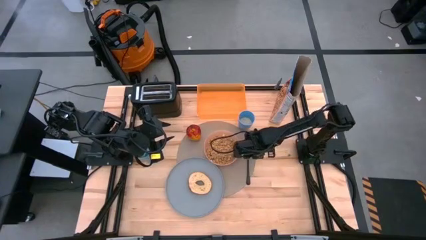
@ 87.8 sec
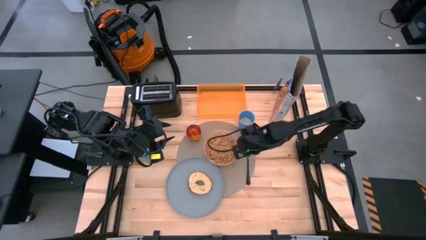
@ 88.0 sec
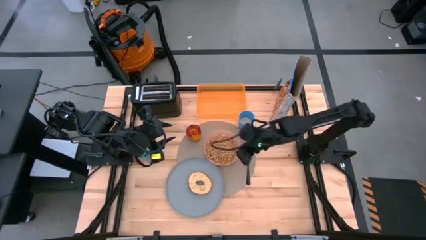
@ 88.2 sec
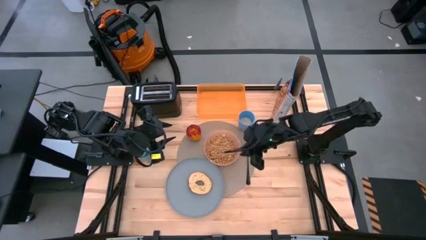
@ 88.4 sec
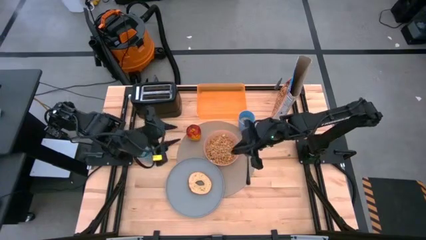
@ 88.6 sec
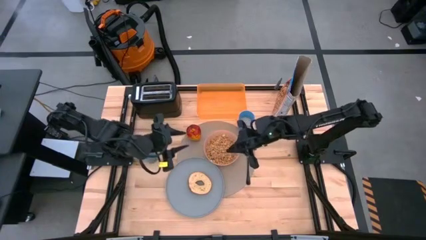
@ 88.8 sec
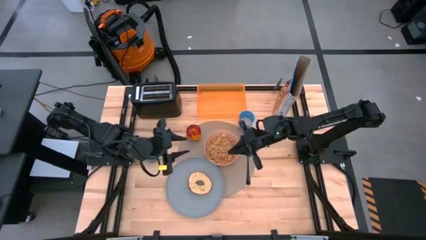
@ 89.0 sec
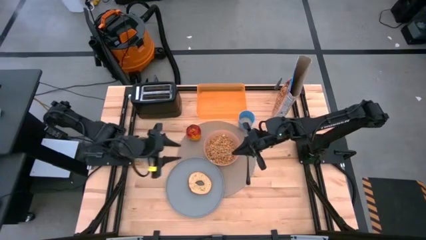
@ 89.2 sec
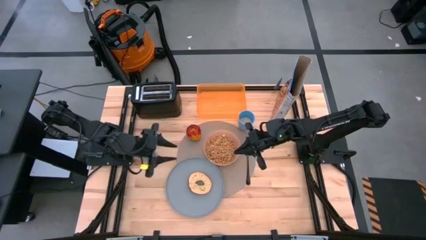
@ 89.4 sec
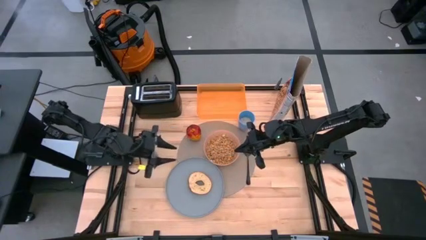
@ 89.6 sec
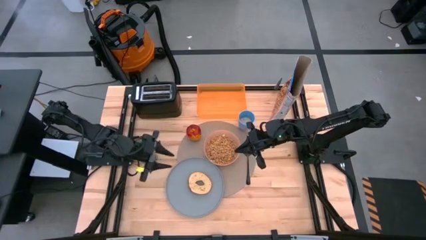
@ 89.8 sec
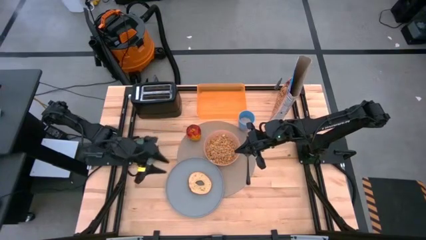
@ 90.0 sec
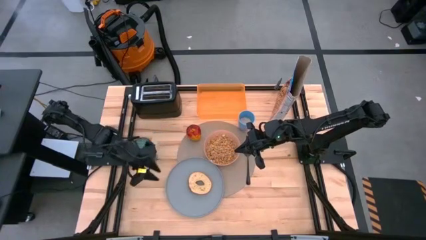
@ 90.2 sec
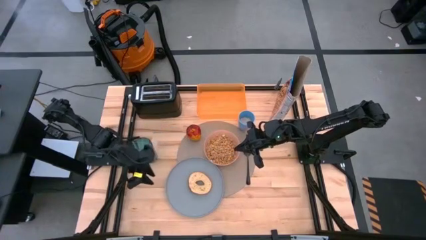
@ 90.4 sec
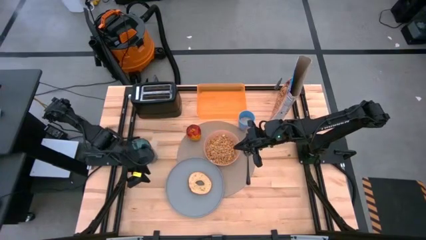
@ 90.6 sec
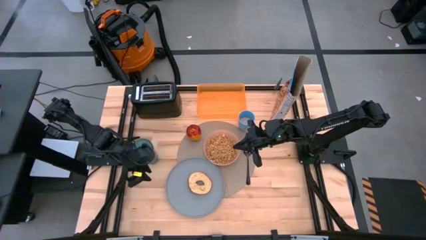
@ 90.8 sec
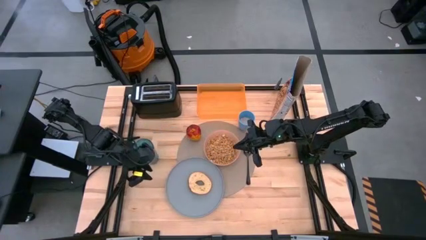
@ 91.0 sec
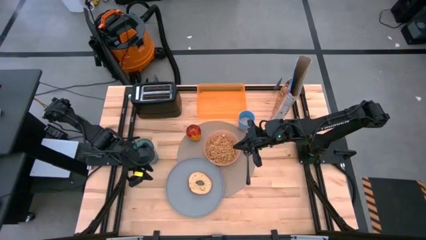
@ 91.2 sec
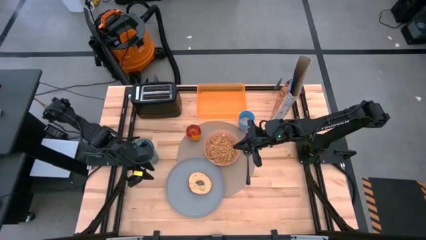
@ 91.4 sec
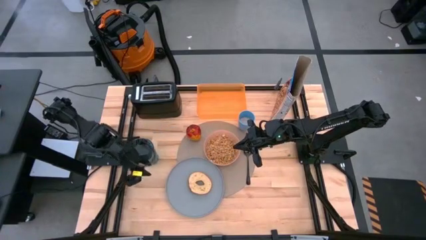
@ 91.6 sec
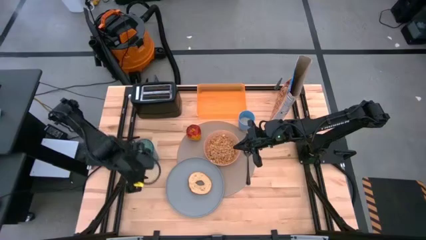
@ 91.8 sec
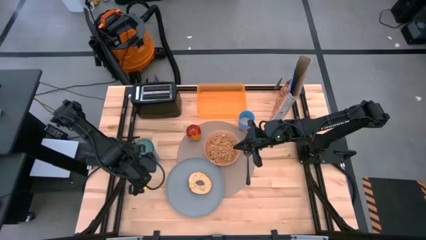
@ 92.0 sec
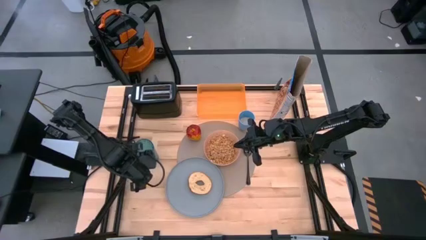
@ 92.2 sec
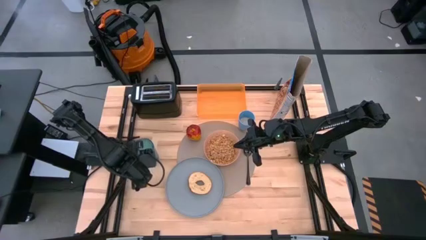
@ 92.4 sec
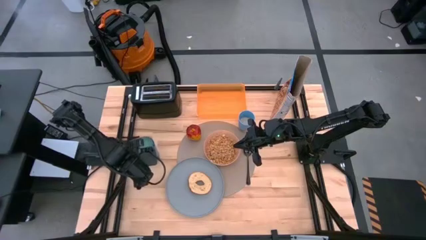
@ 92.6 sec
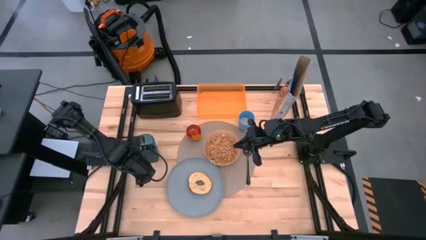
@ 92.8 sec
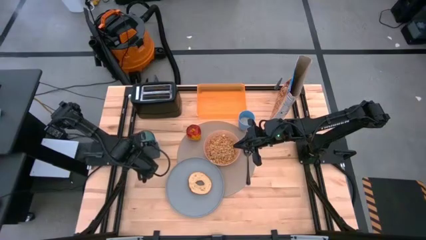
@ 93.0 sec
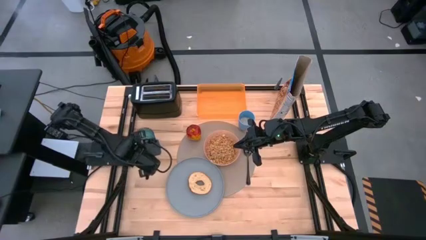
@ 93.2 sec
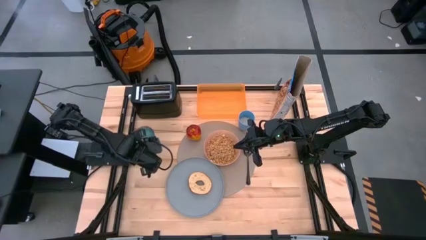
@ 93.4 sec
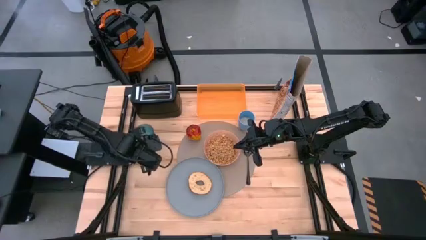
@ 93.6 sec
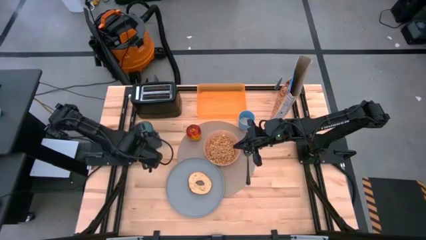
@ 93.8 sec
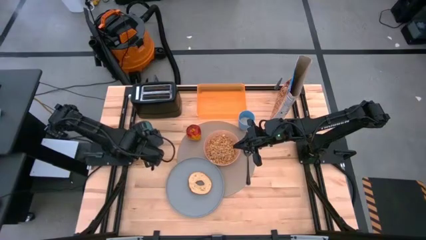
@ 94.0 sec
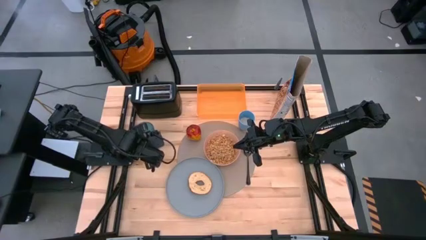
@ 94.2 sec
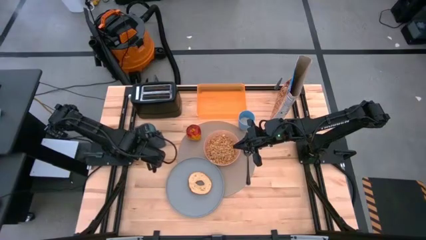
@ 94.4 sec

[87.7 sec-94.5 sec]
Task: Arrange a breakfast setting
Adjust the blue crystal cup

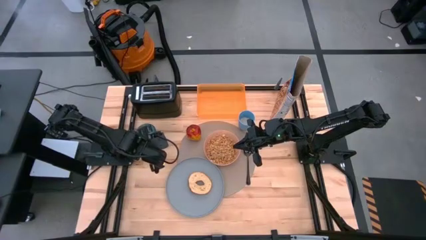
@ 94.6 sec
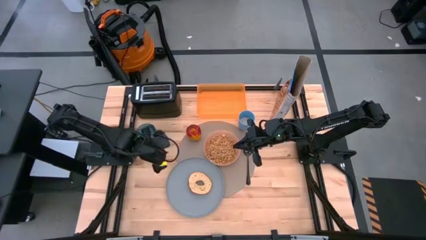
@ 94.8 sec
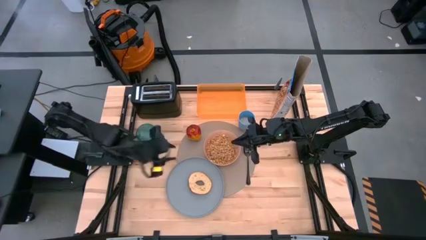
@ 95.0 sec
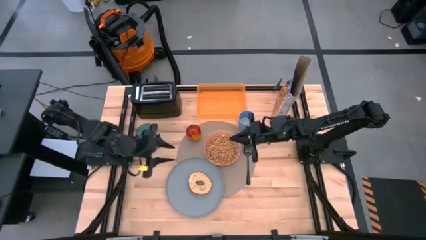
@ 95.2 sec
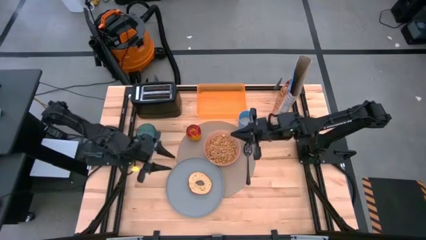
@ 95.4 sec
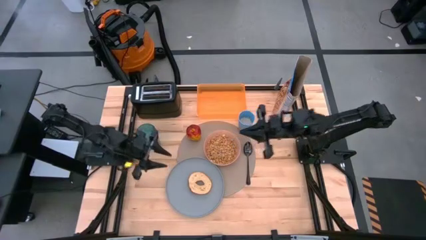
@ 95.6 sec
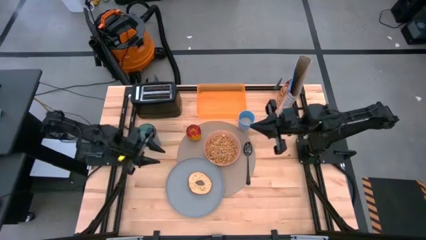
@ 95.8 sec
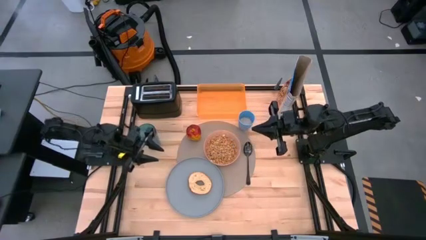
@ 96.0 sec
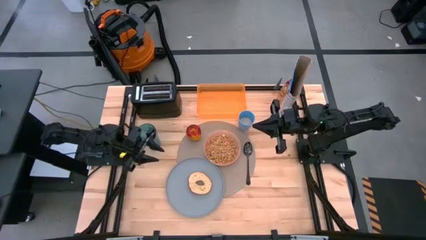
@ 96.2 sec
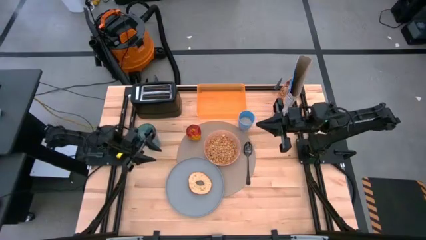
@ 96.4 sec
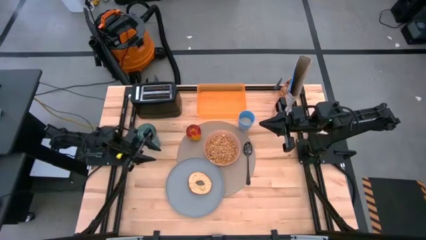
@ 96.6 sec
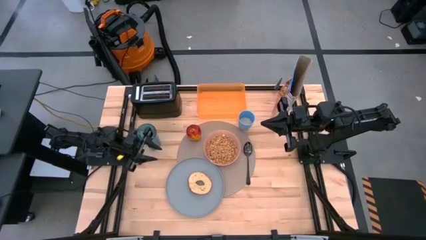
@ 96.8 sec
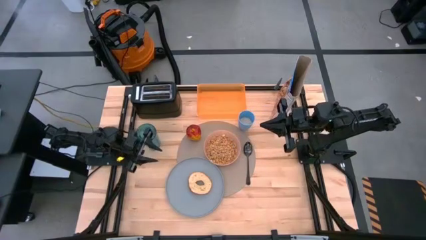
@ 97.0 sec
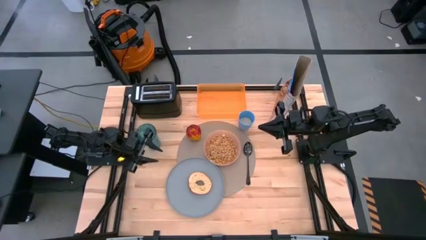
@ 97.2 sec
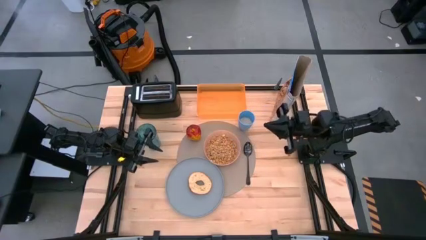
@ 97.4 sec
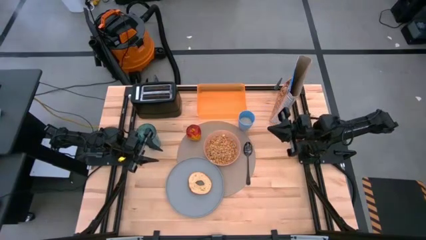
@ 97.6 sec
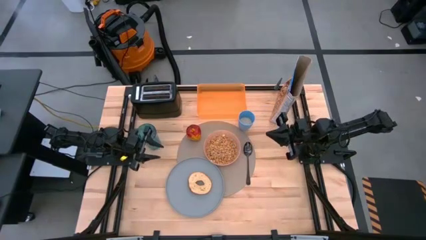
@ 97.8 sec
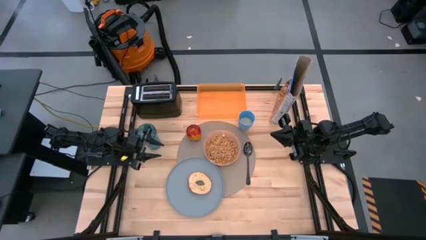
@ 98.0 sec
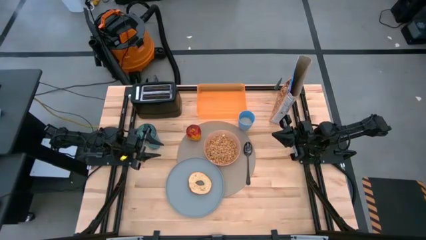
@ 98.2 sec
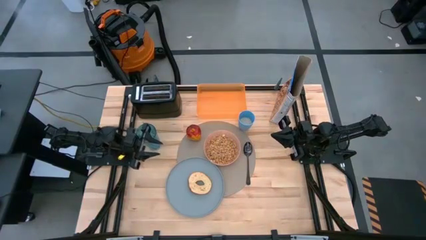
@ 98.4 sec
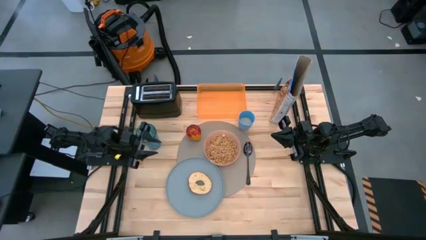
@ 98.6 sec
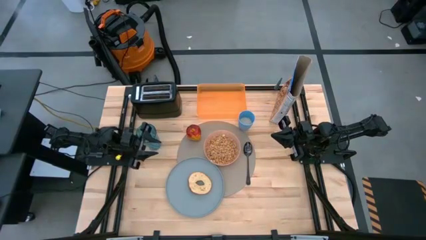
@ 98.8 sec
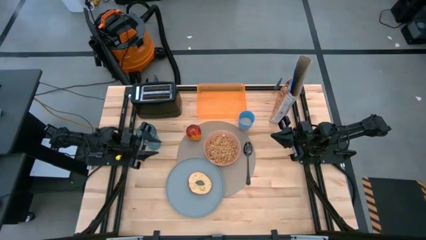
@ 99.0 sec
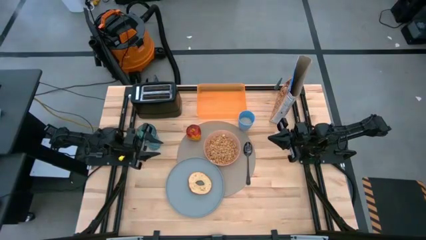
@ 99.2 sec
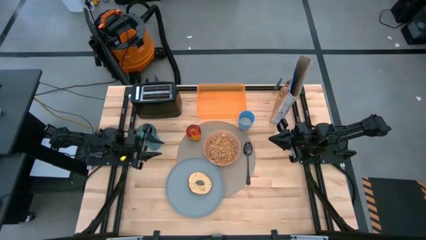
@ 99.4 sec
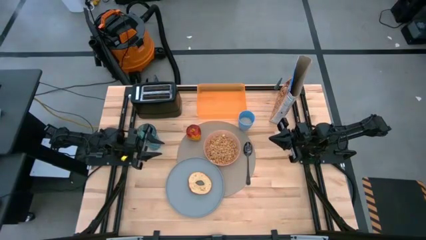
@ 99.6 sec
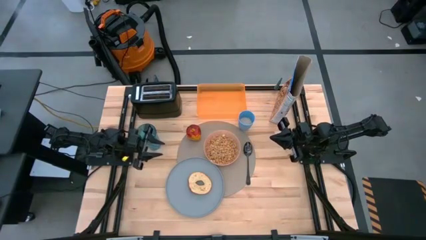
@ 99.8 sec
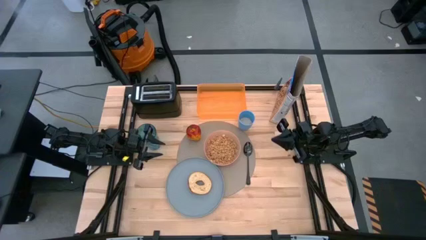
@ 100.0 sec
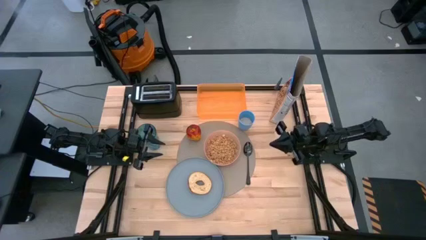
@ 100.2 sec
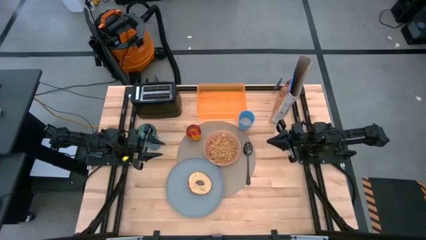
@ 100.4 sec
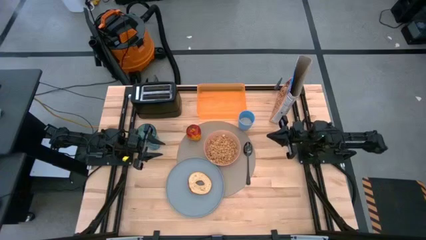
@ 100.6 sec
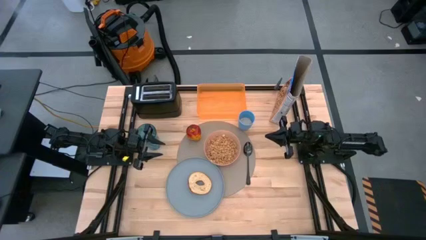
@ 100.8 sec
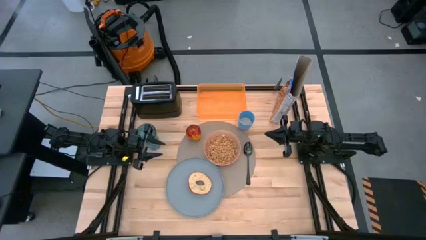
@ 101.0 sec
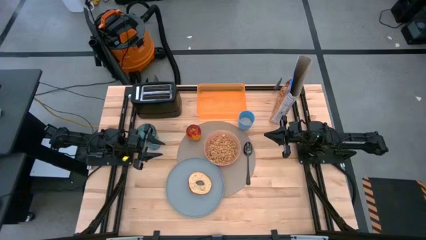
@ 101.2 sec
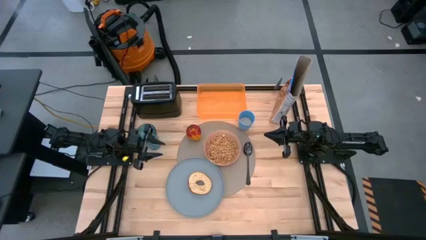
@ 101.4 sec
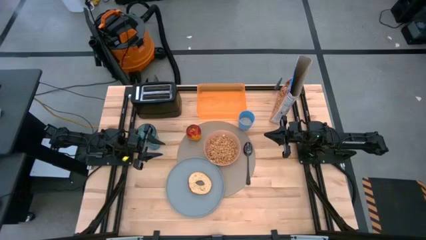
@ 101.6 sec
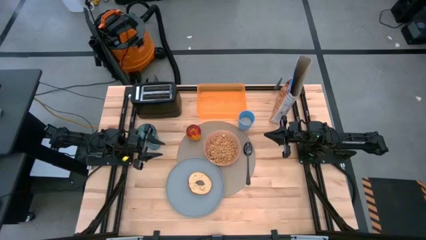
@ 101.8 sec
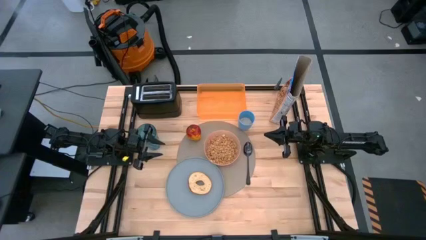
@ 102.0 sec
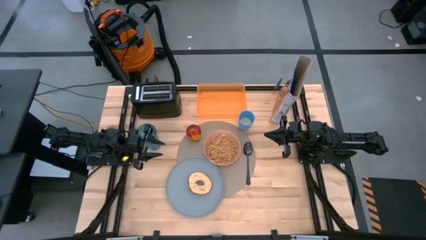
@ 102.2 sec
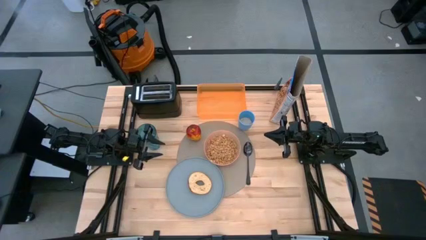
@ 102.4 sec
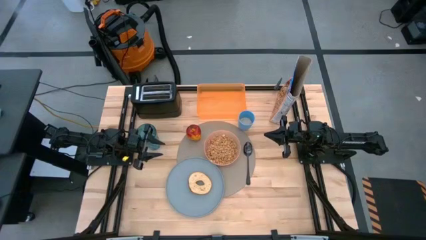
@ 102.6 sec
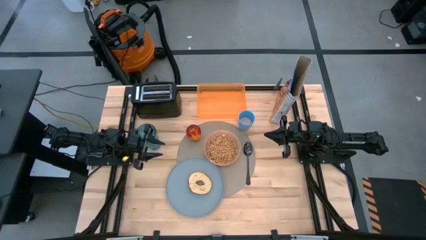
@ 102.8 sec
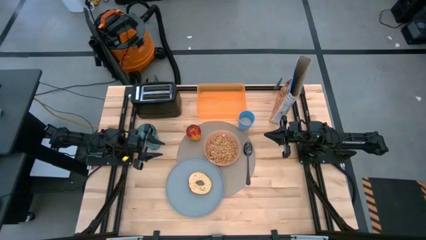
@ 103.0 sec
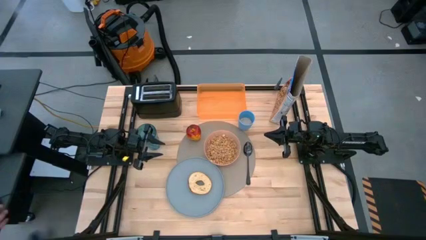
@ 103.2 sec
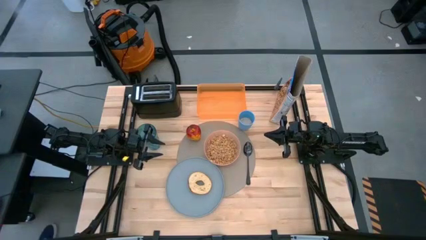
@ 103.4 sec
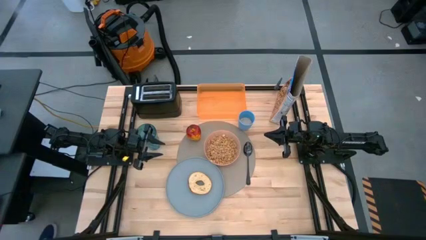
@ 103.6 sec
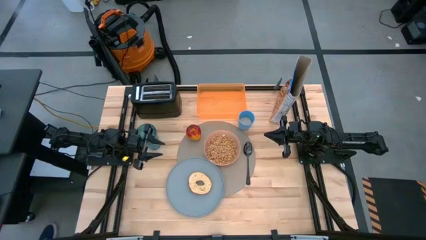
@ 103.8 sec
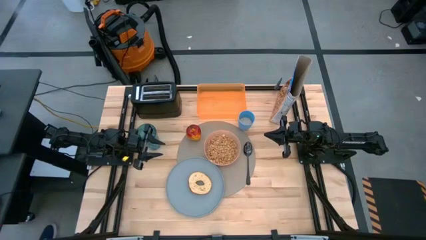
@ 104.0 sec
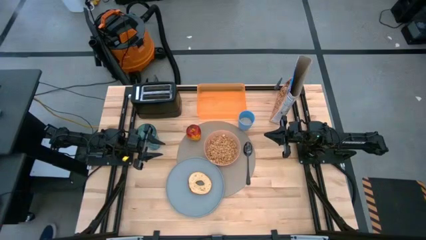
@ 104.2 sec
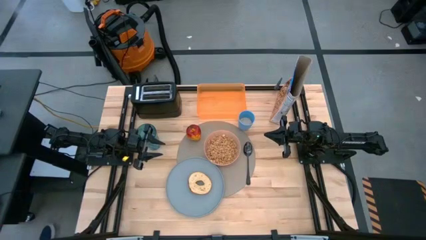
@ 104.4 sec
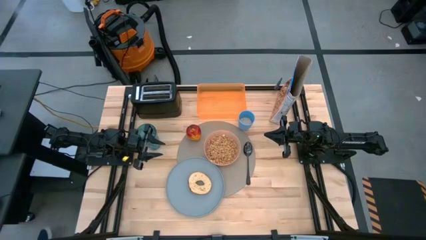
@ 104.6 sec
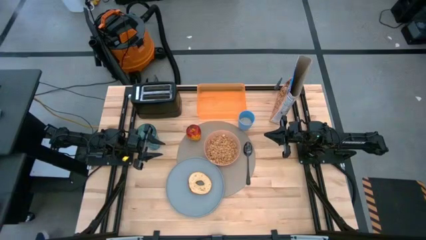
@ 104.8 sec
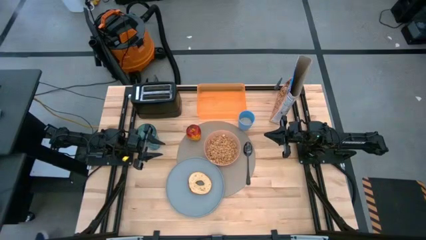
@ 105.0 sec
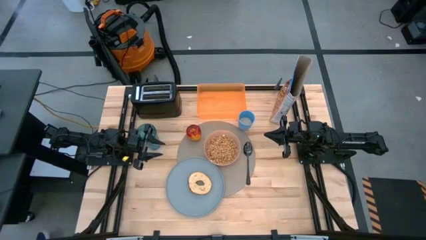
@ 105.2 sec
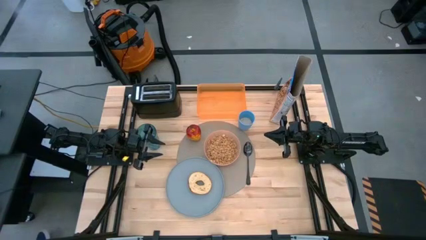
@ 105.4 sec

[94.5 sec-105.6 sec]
Return to Home Position
